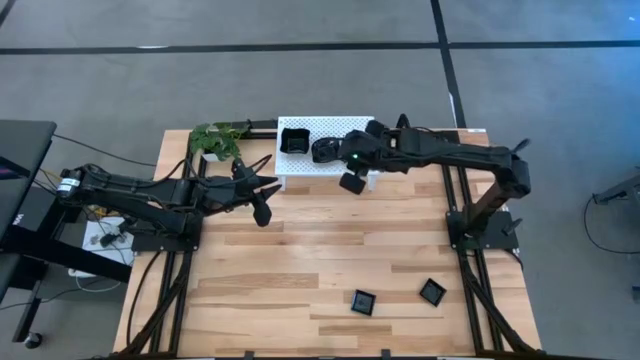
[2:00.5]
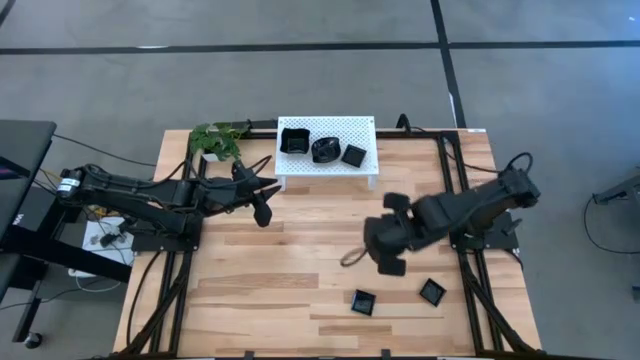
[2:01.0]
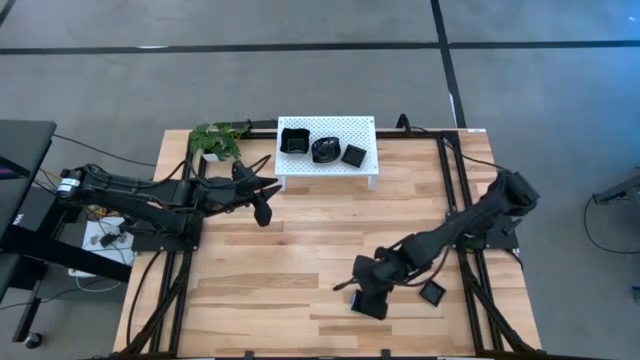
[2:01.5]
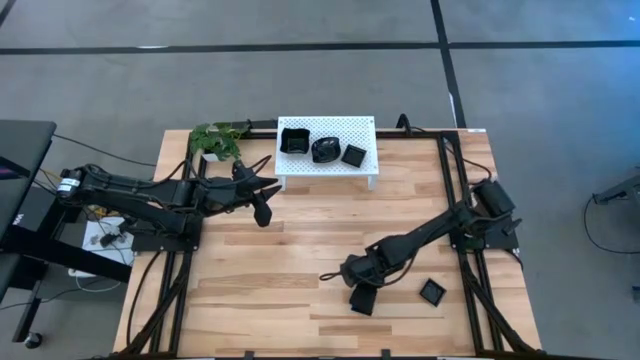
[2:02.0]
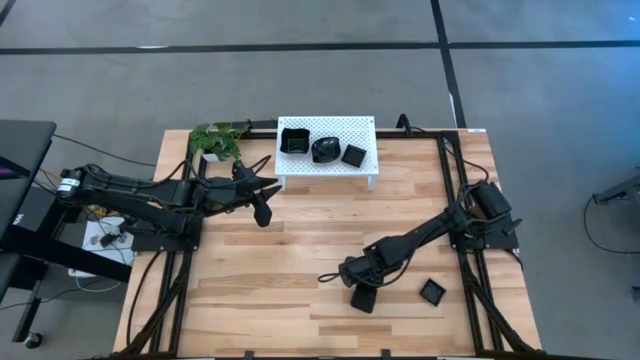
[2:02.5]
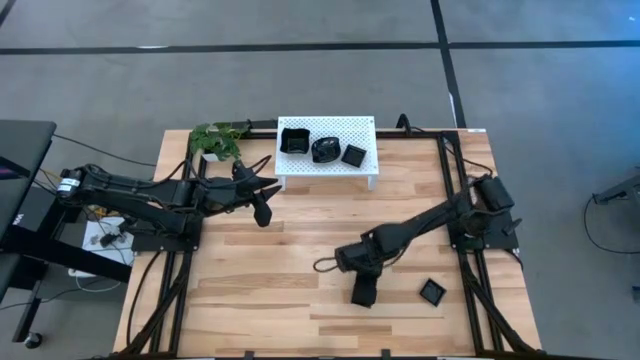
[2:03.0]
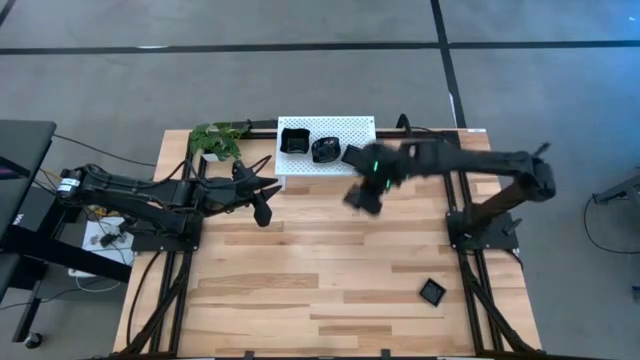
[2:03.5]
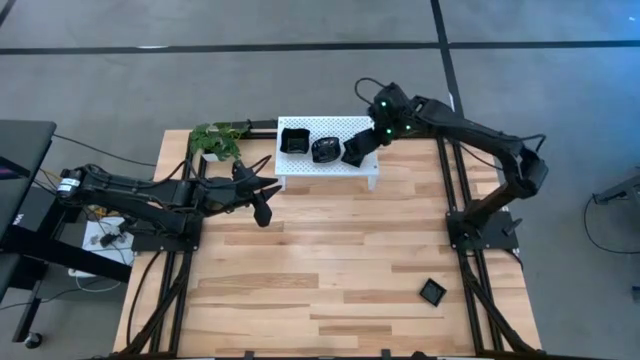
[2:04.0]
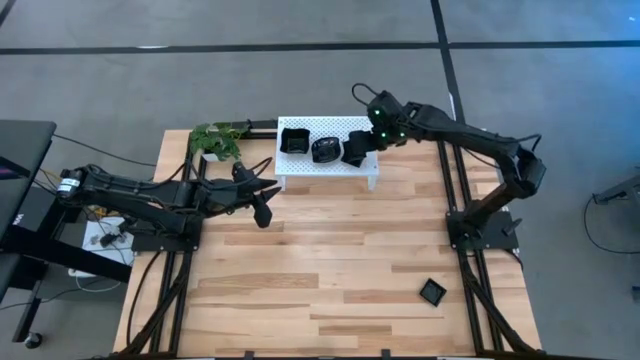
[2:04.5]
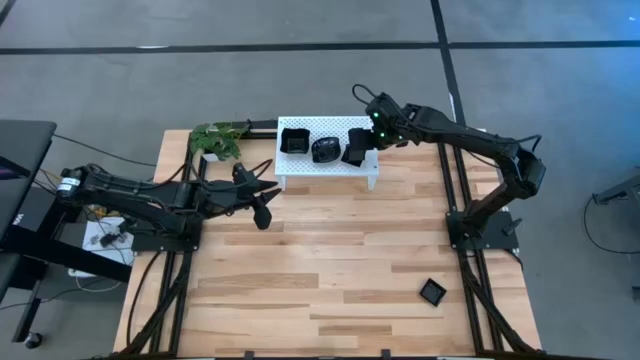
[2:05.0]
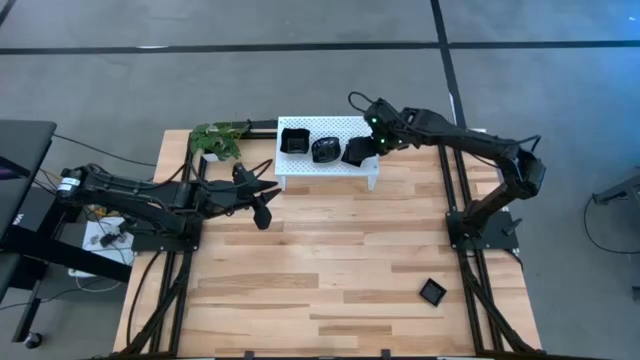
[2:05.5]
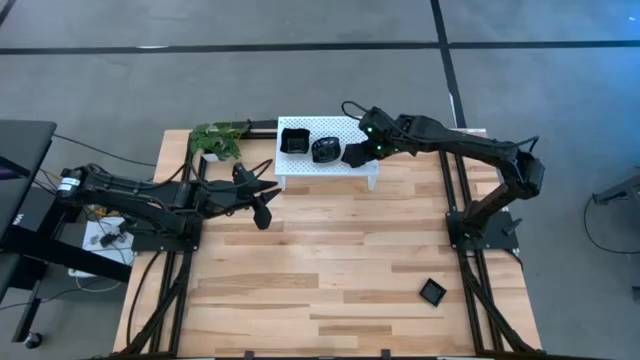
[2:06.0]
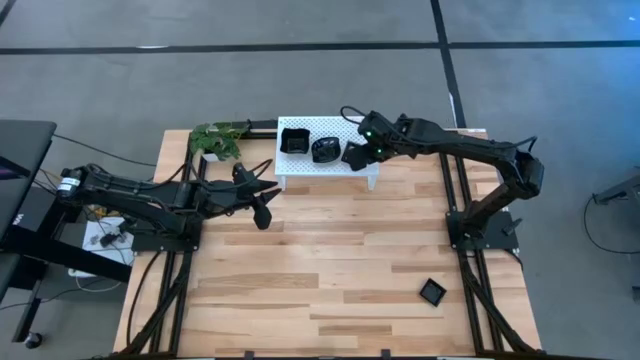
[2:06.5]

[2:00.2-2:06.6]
Task: Pick & Place Mini shaped plates
Stack the black square plate on top of the black square plates on the shelf

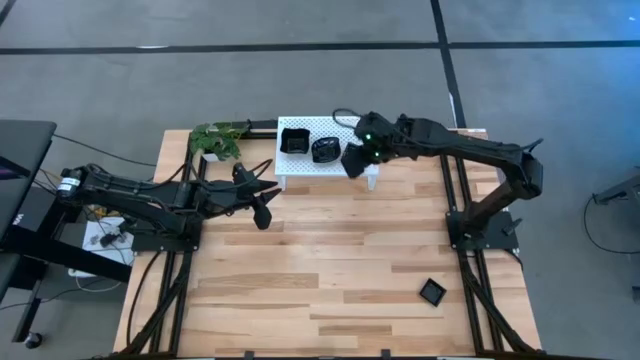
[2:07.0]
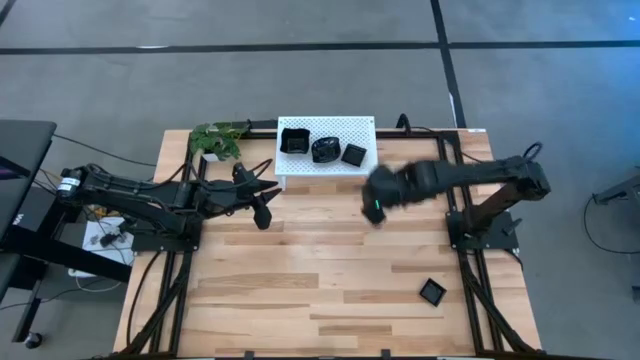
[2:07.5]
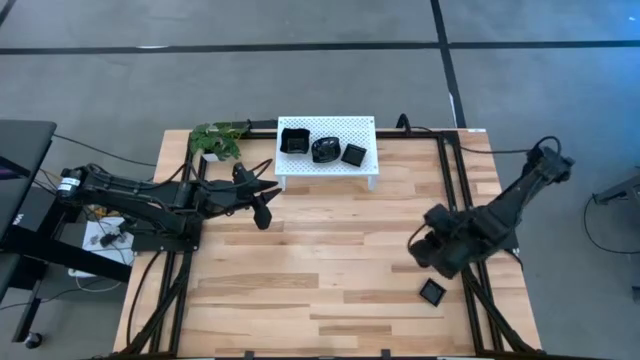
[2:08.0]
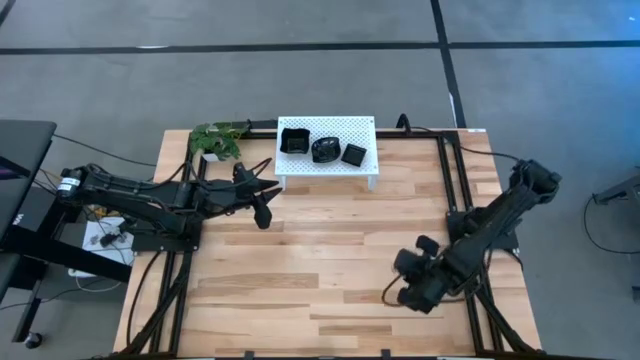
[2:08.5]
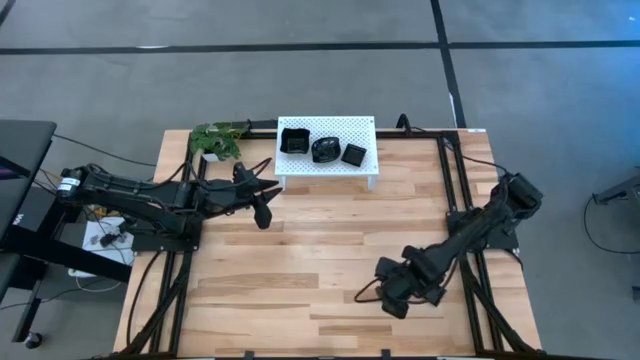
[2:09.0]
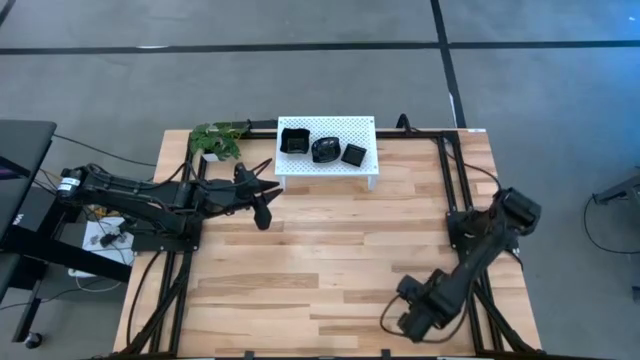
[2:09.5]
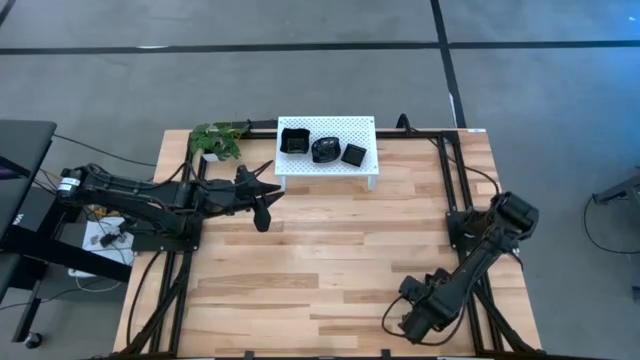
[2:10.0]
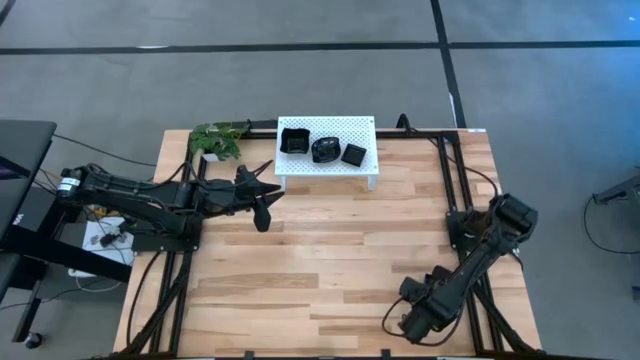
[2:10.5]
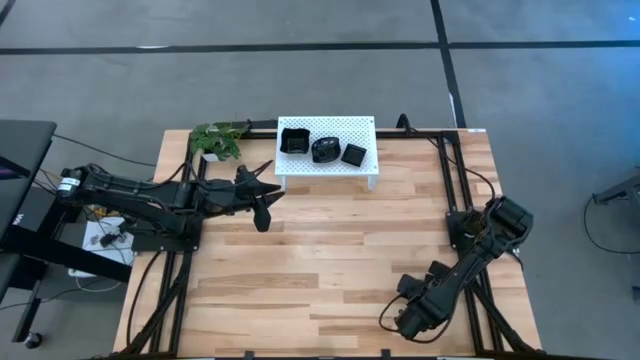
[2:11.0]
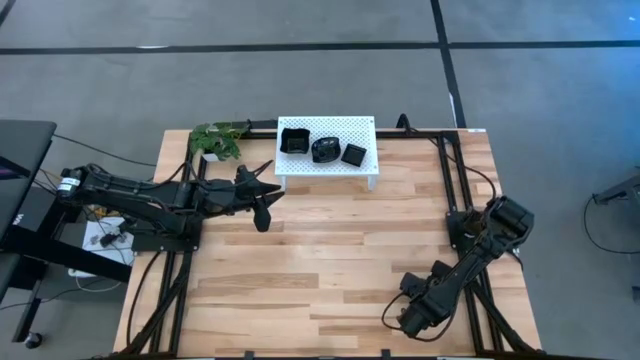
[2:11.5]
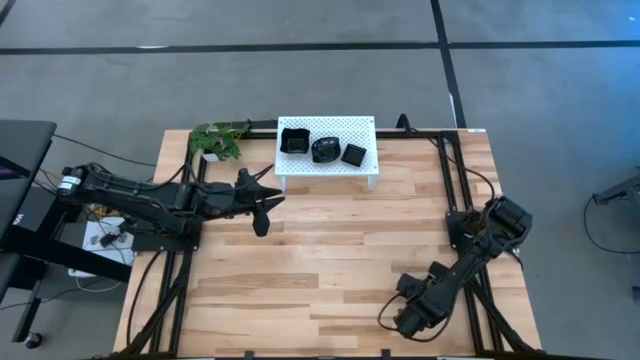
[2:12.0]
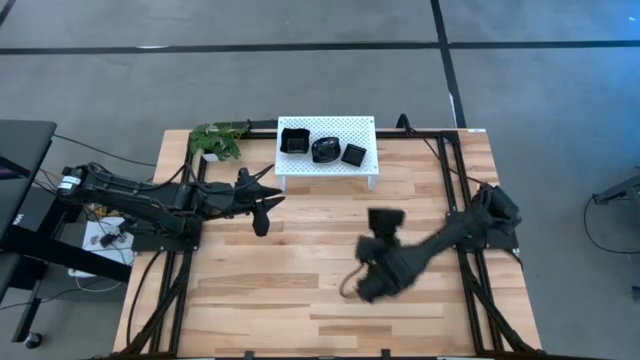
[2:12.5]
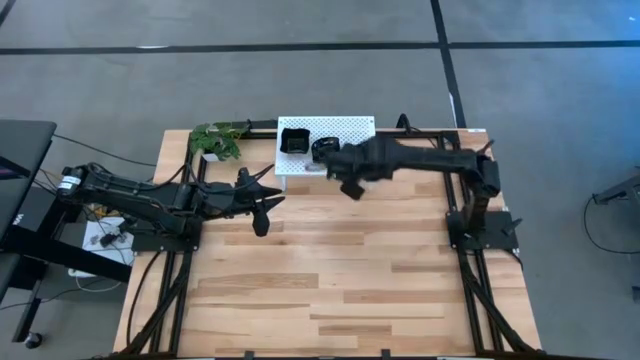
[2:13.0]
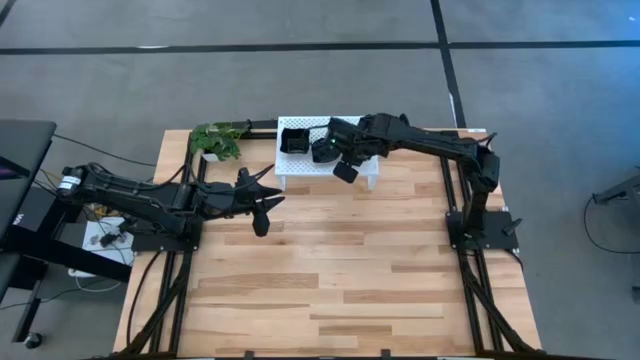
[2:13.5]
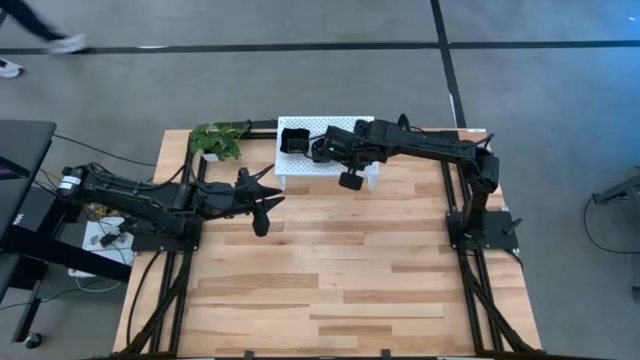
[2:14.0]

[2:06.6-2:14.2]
Stack the black square plate on top of the black square plates on the shelf

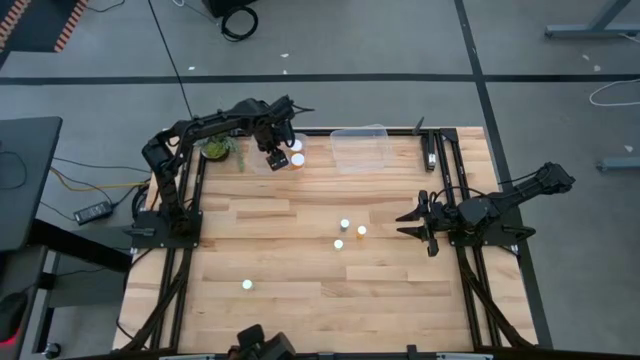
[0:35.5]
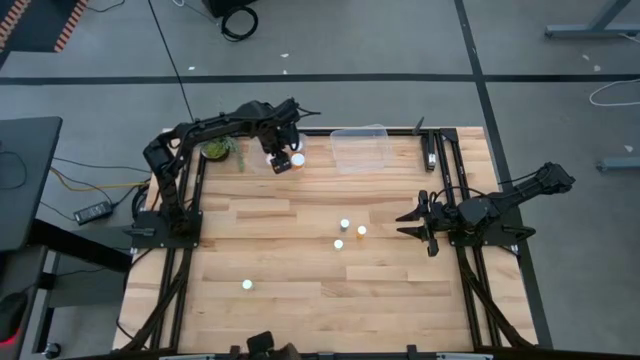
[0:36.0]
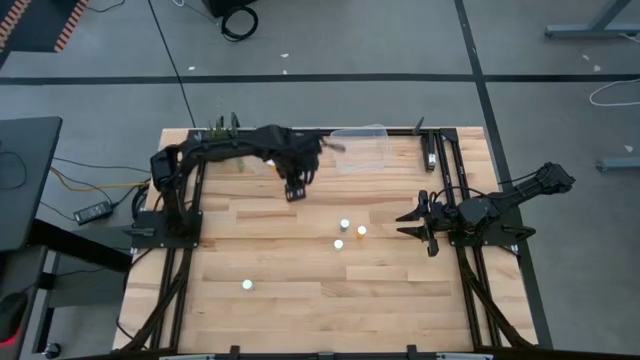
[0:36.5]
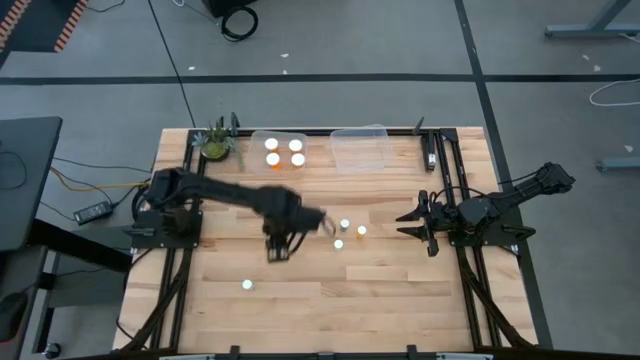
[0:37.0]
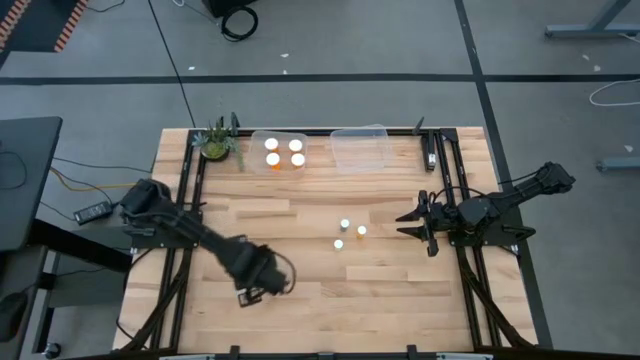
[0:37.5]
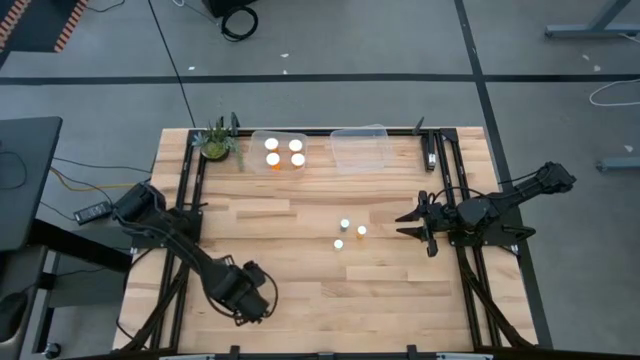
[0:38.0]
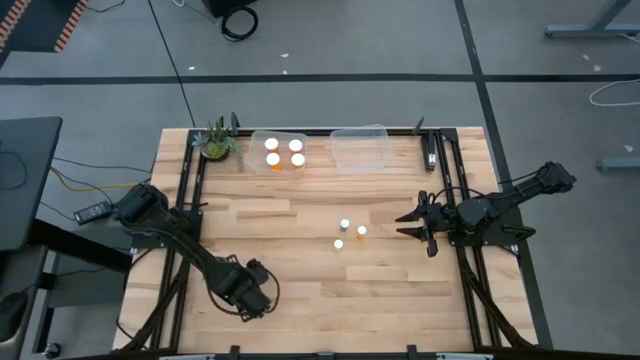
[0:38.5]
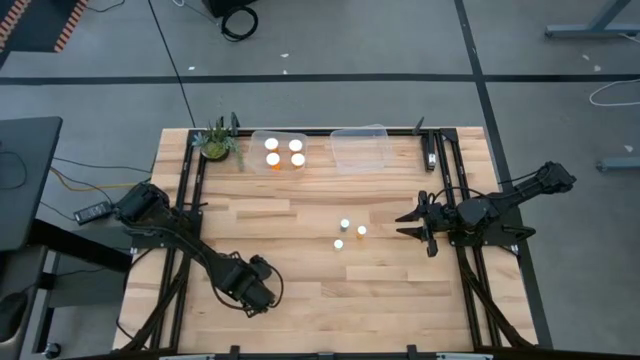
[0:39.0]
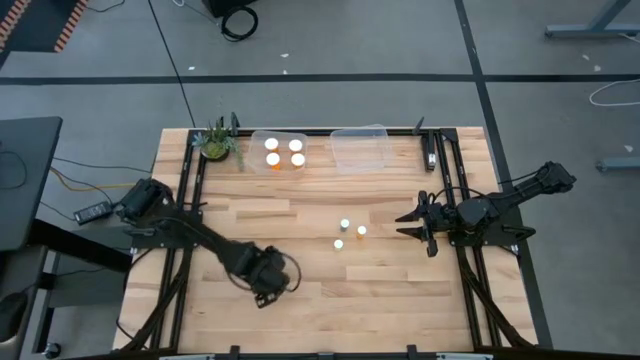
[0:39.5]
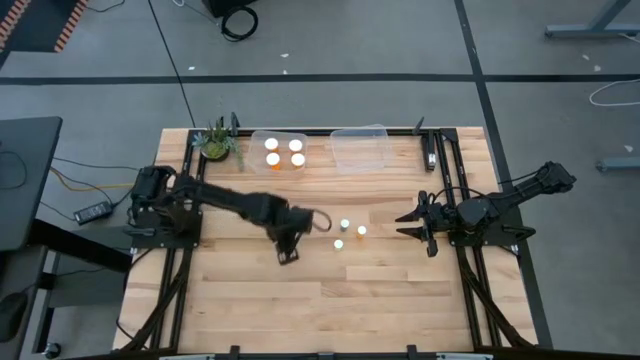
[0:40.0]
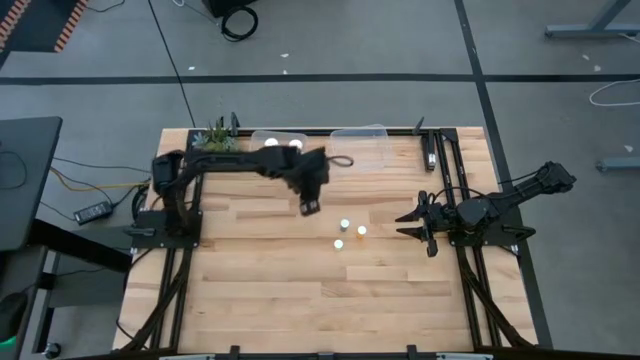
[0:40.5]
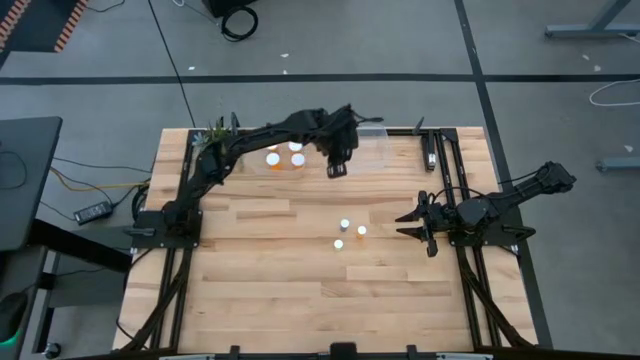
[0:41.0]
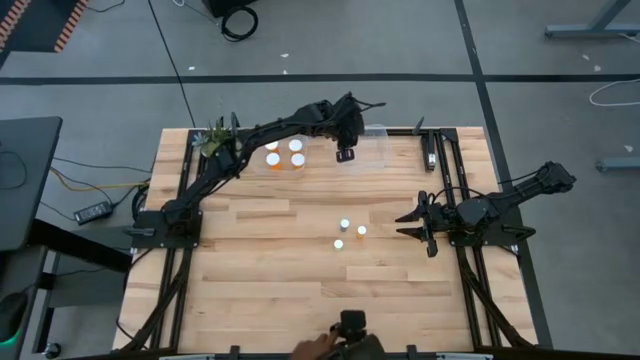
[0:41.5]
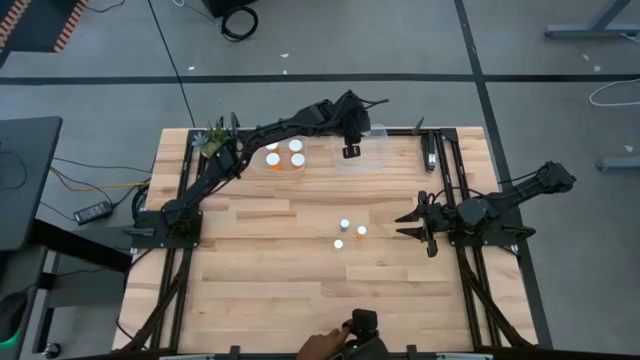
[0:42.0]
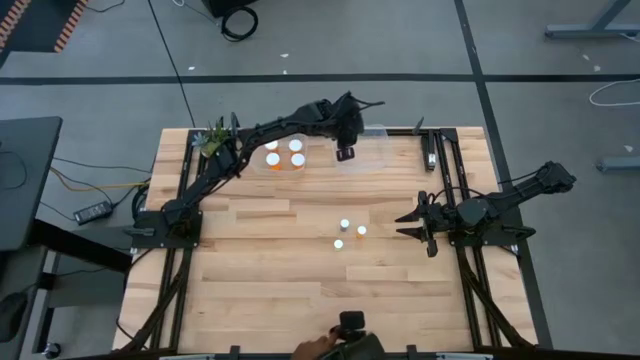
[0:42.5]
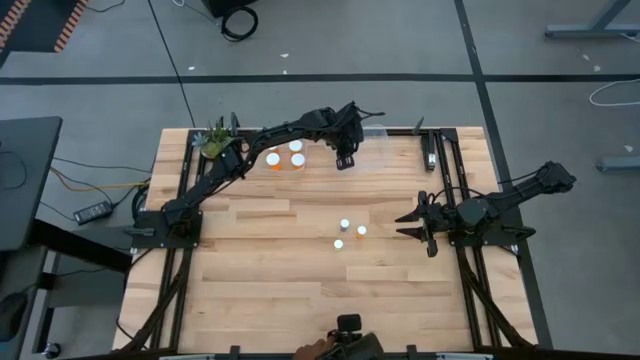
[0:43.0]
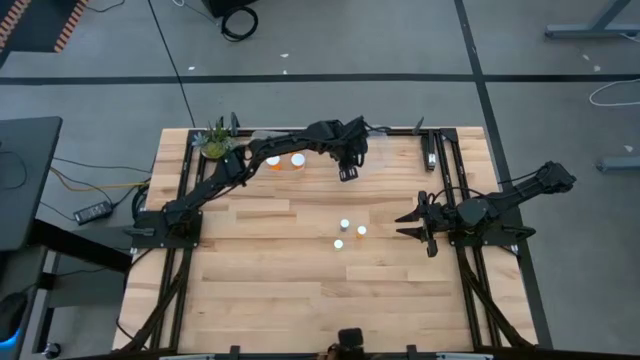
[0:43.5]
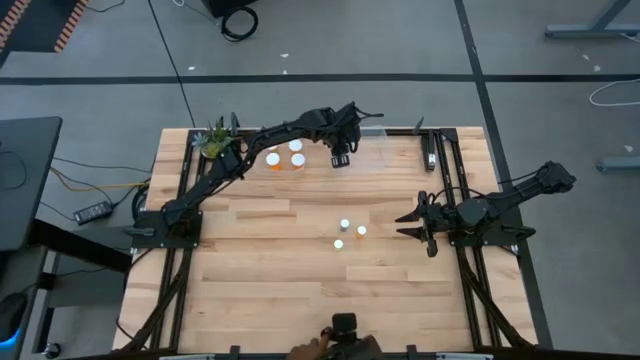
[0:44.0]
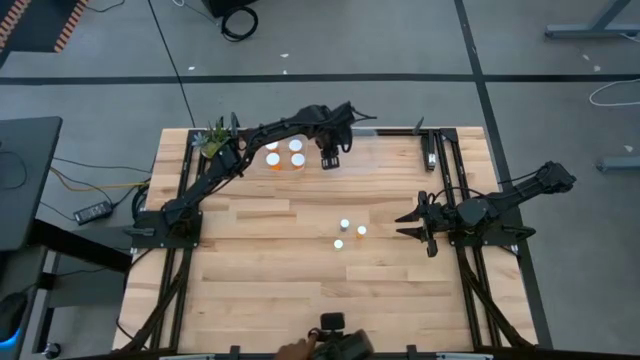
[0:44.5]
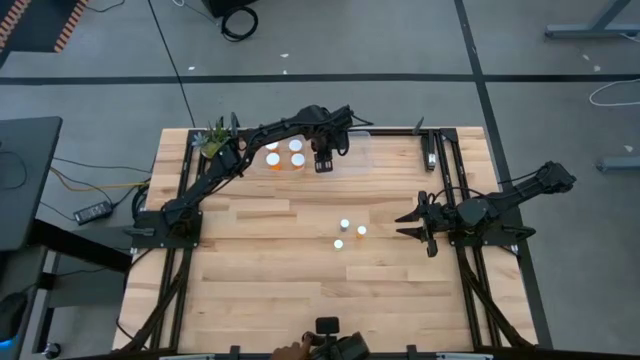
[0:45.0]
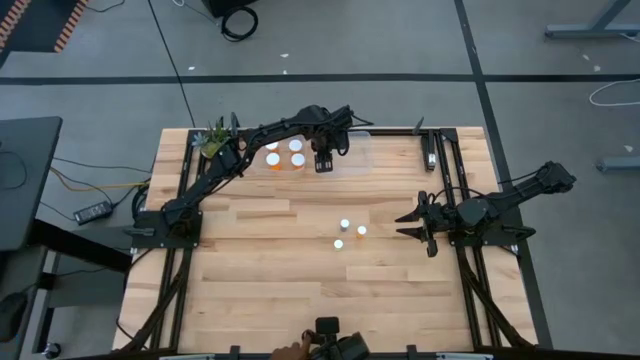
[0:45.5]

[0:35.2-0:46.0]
Task: Pick and place medicine bottles into bin by pill shape (circle, oval)
Put the bottom small yellow pill bottle into the right bin
